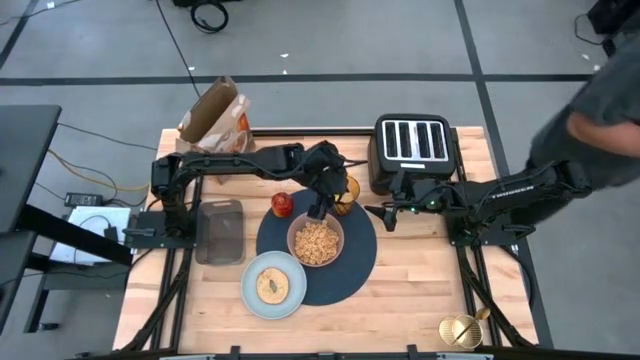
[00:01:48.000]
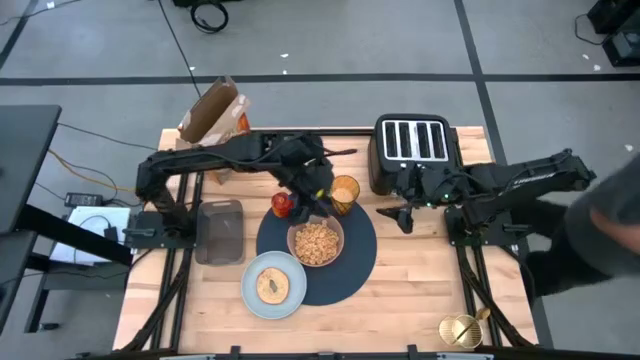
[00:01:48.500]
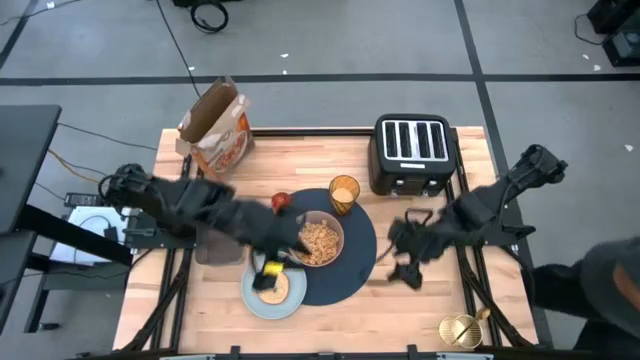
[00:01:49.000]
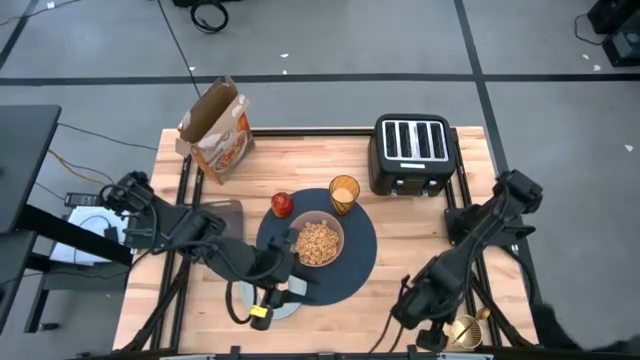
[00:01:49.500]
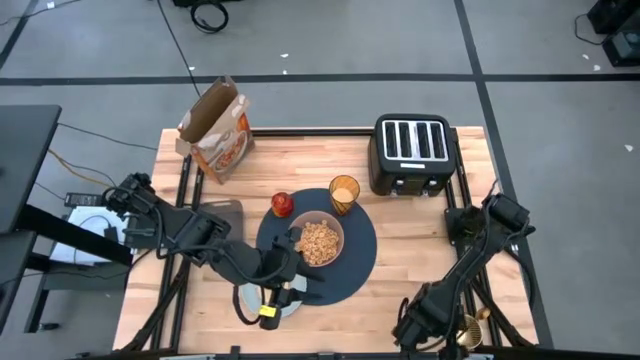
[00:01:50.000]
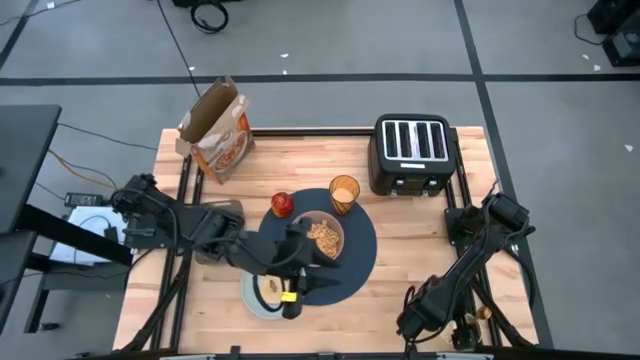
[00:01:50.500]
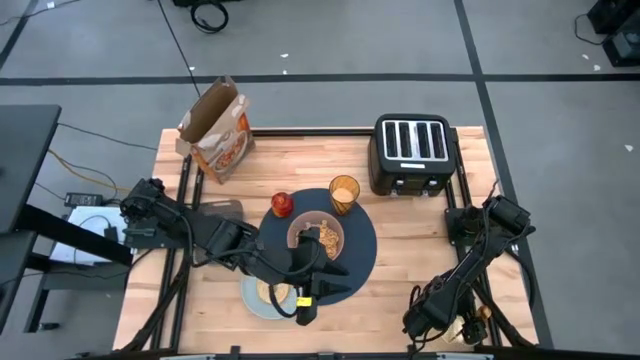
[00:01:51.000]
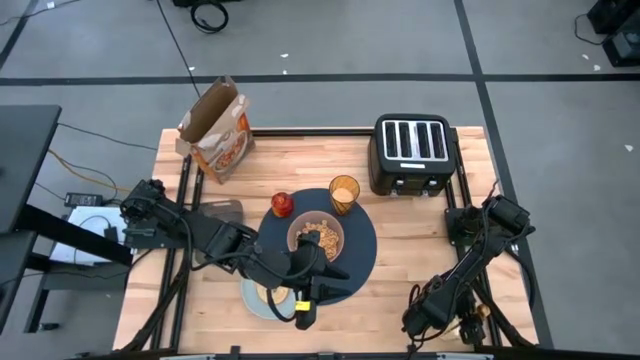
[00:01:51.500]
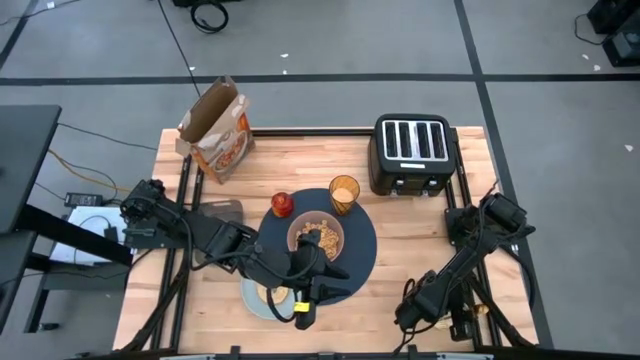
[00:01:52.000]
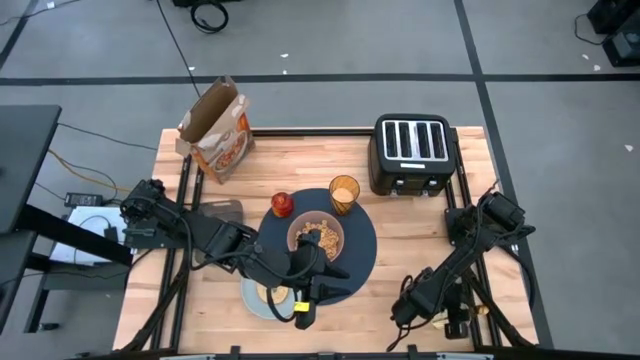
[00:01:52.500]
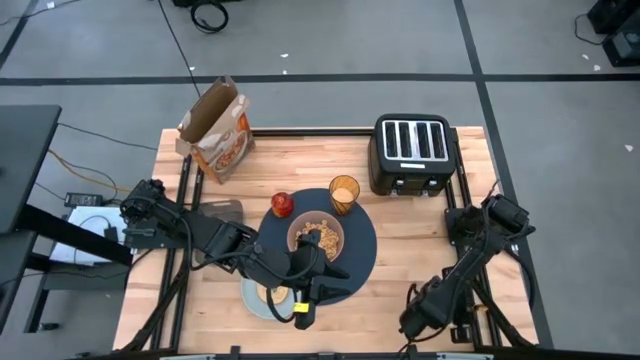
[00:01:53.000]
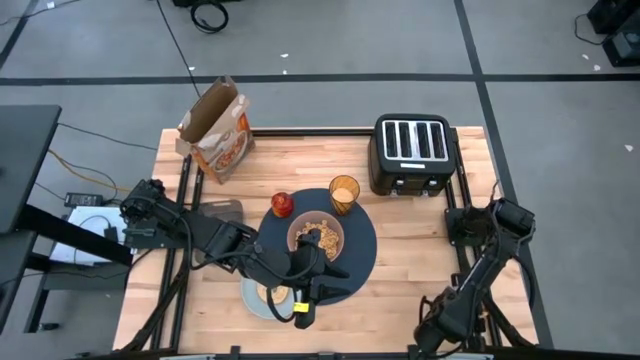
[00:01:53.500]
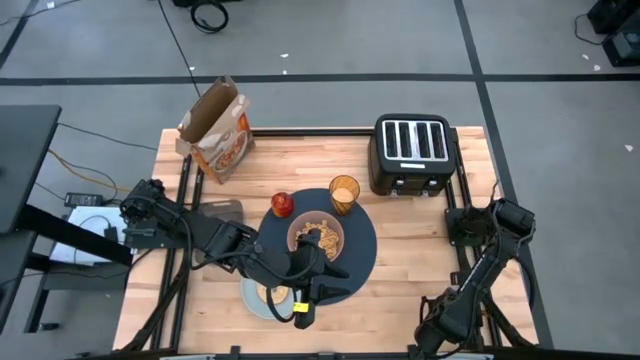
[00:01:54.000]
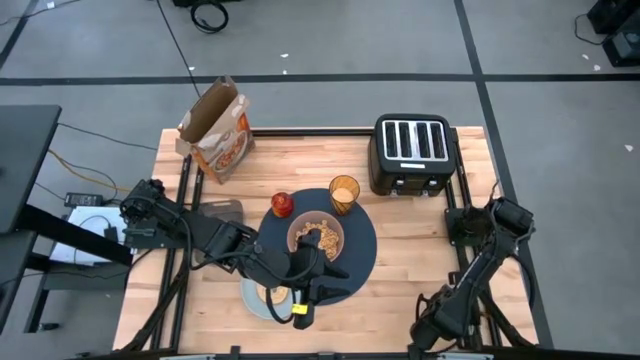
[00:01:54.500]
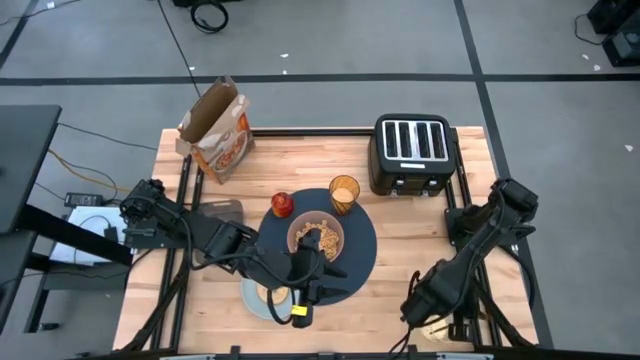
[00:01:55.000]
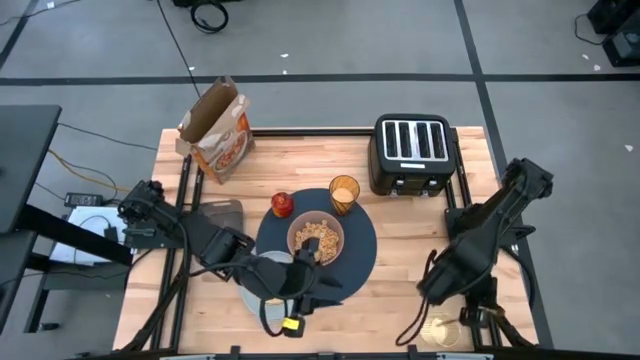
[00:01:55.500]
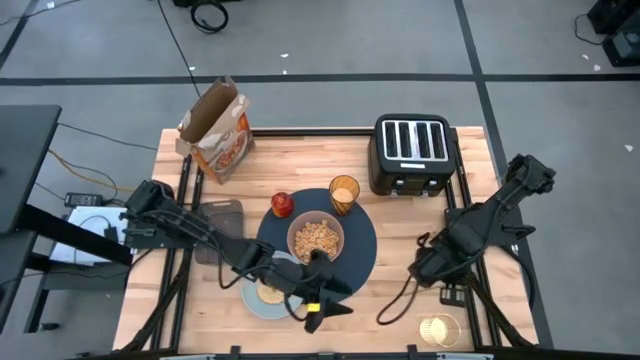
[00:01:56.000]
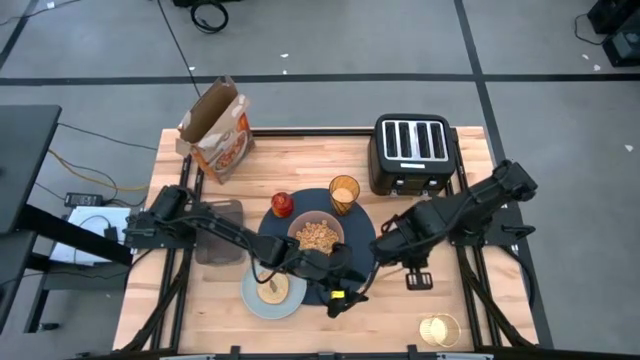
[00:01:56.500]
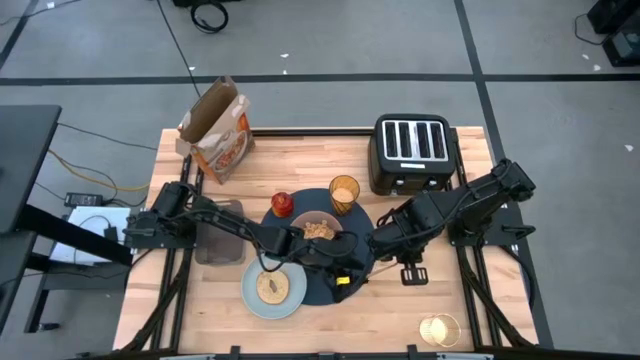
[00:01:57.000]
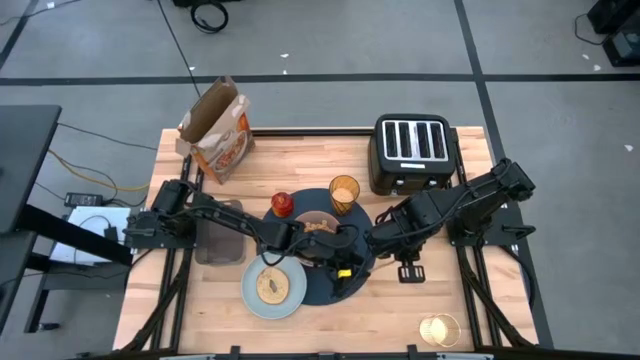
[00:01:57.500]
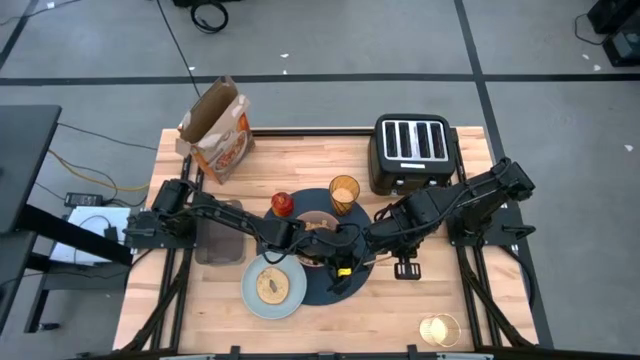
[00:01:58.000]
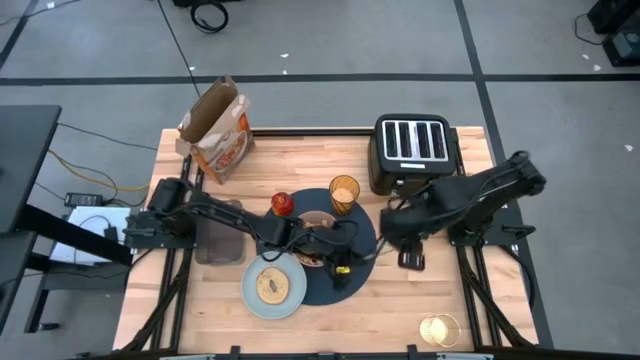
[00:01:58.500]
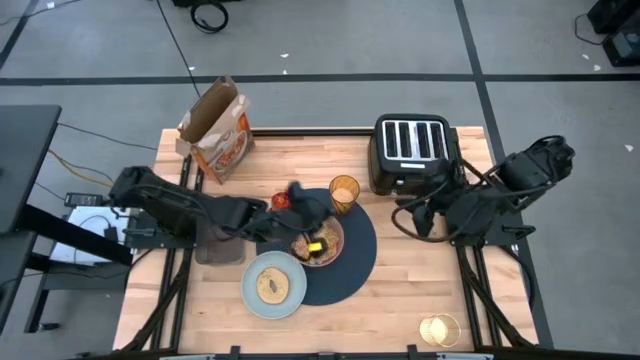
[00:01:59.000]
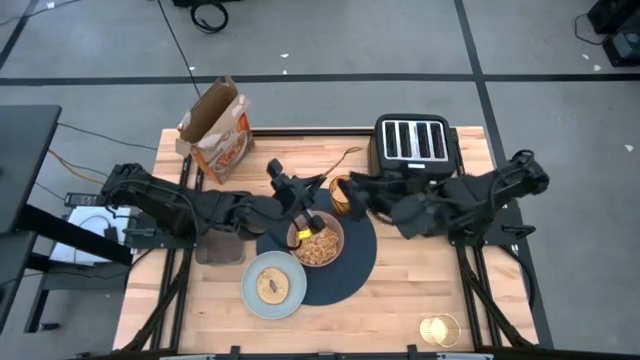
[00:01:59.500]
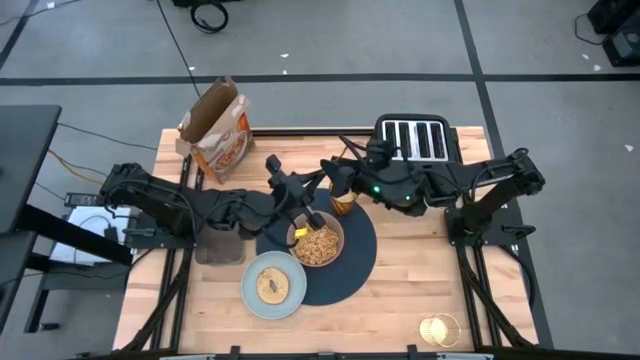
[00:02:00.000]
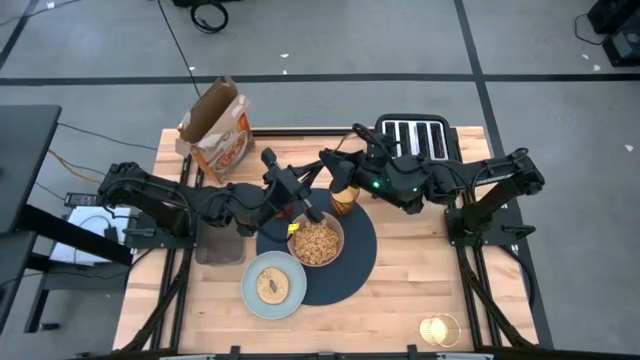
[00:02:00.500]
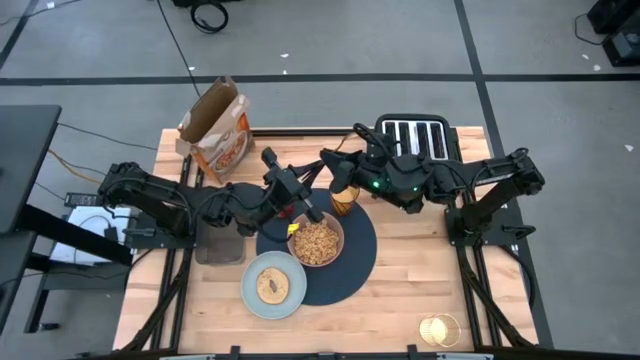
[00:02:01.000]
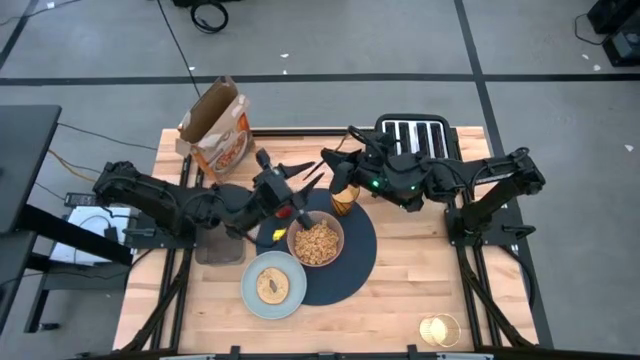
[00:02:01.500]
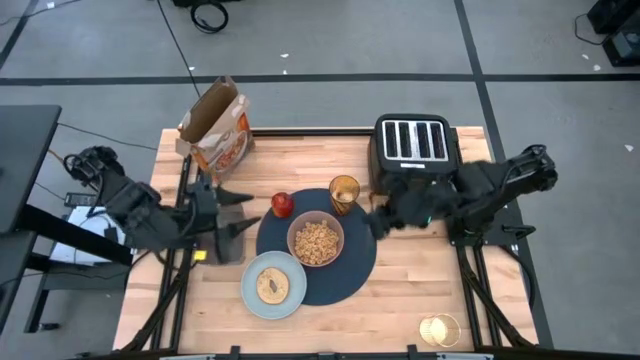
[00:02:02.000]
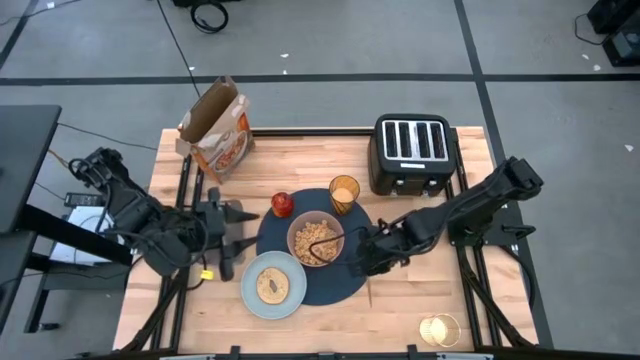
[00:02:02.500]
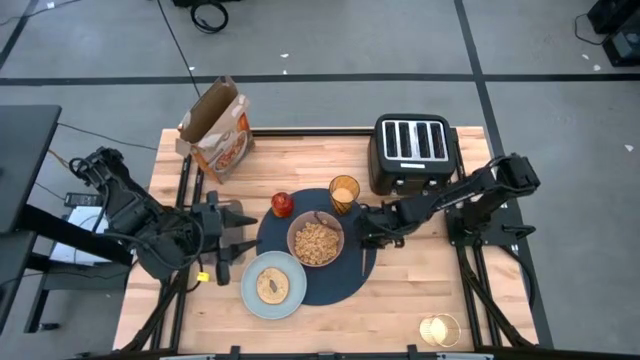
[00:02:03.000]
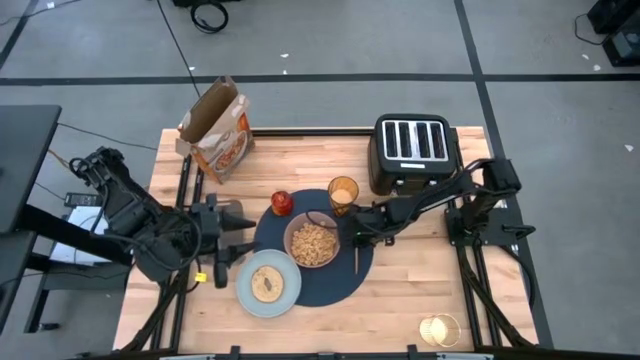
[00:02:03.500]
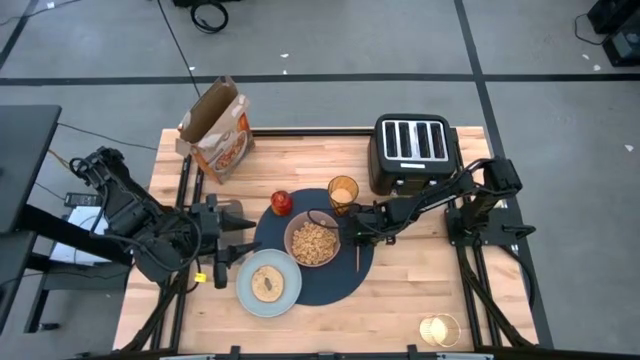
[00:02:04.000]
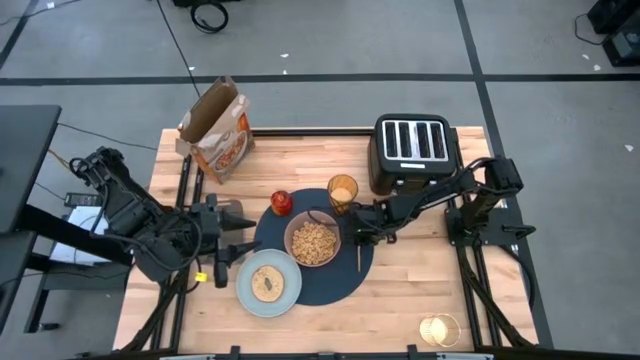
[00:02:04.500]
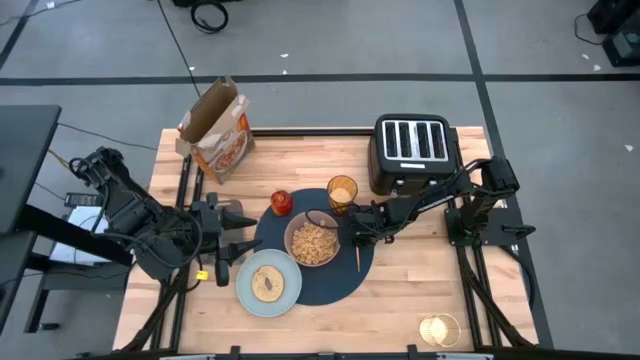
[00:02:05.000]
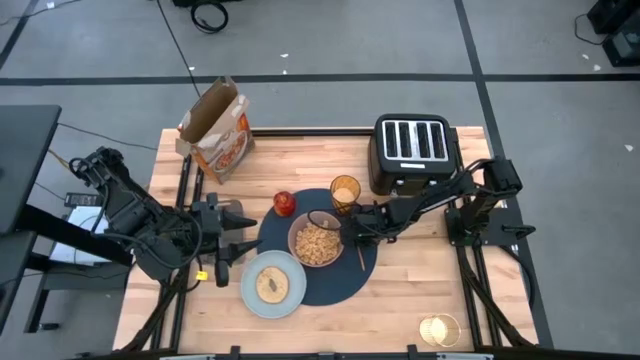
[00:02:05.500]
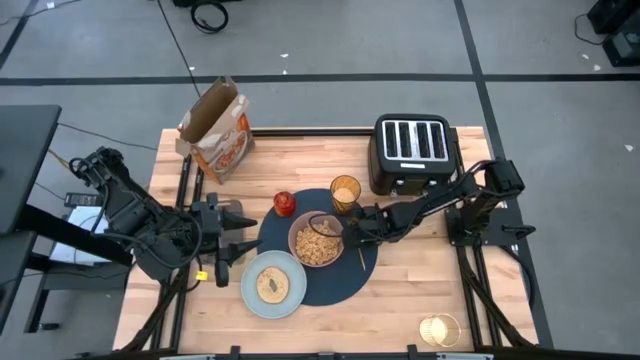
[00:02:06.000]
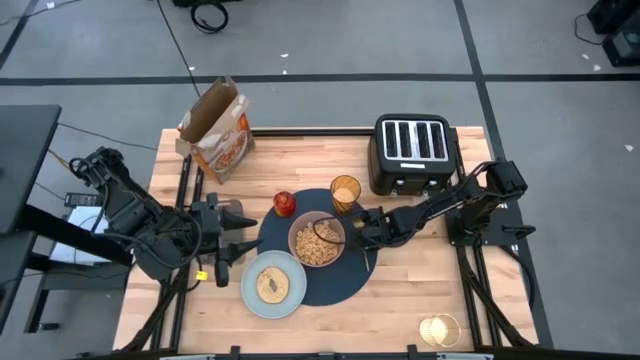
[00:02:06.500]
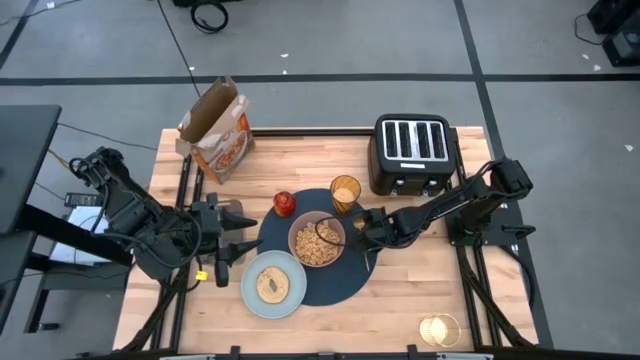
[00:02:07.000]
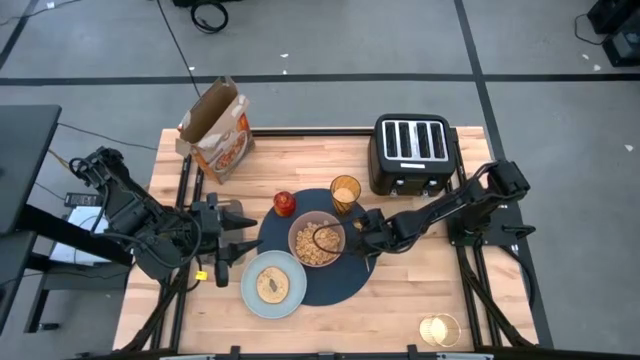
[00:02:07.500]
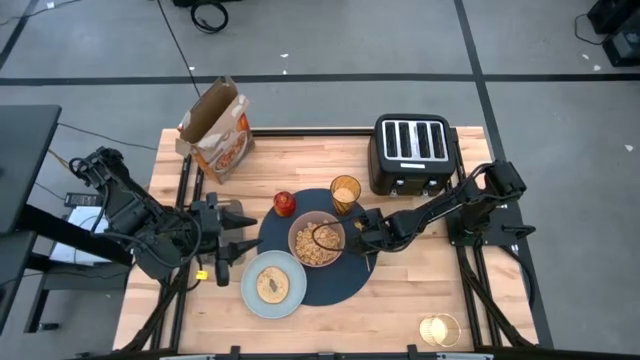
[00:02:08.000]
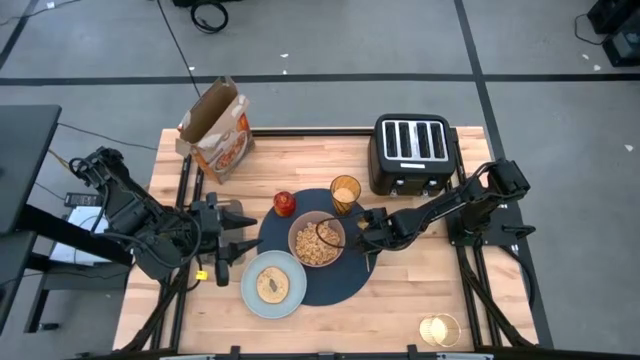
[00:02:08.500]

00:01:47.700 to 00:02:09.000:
Task: Arrange a breakfast setting
Put the gold spoon on the right of the orange bowl on the blue placemat
